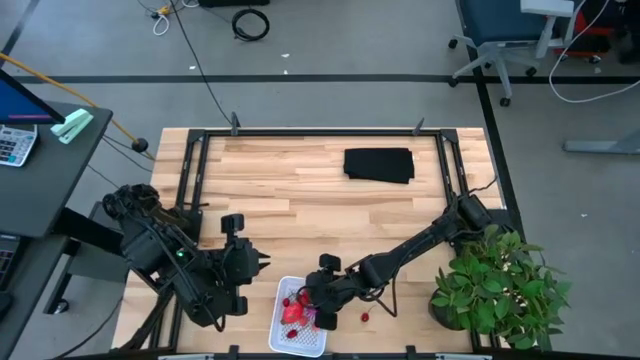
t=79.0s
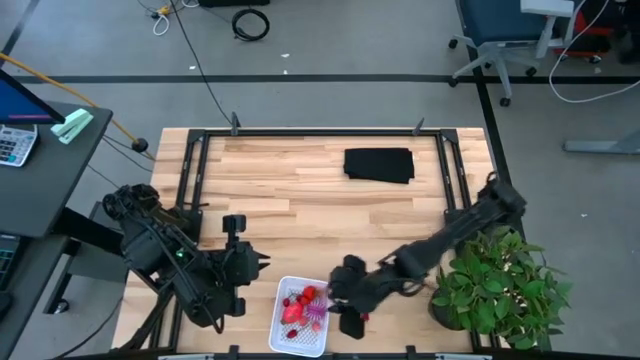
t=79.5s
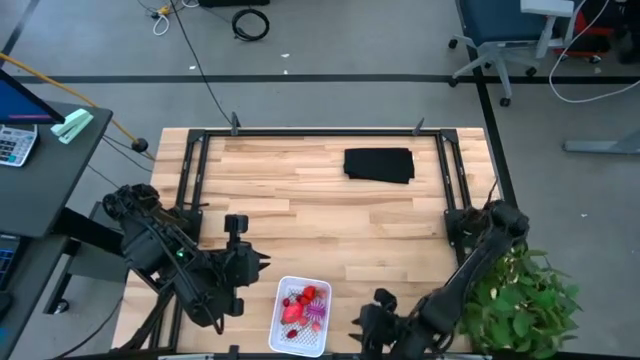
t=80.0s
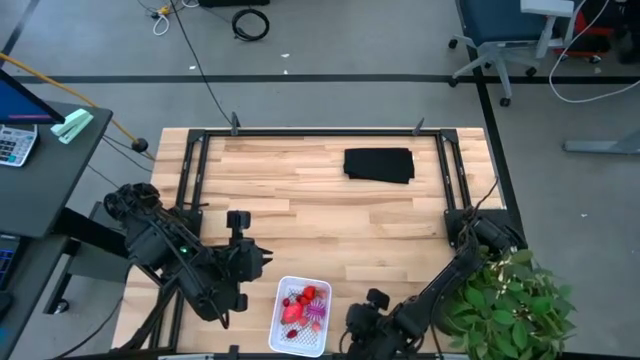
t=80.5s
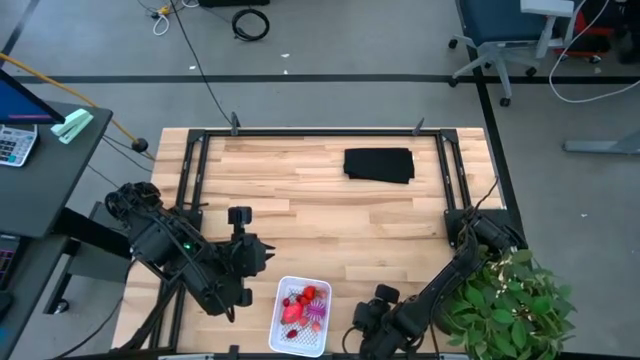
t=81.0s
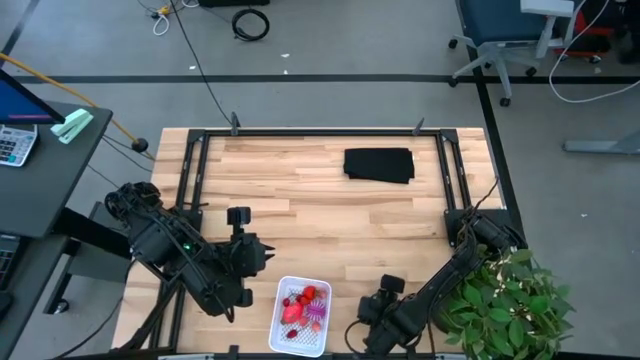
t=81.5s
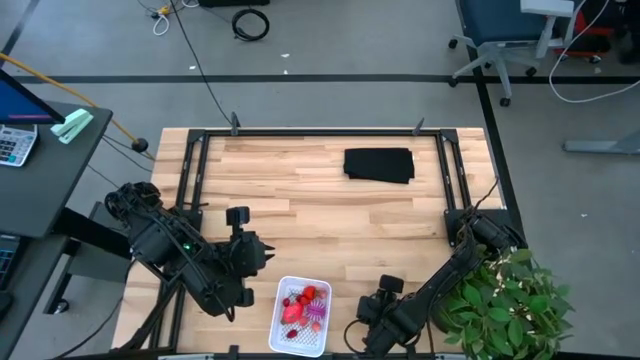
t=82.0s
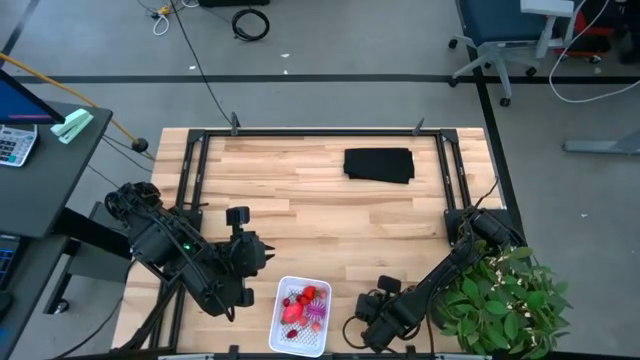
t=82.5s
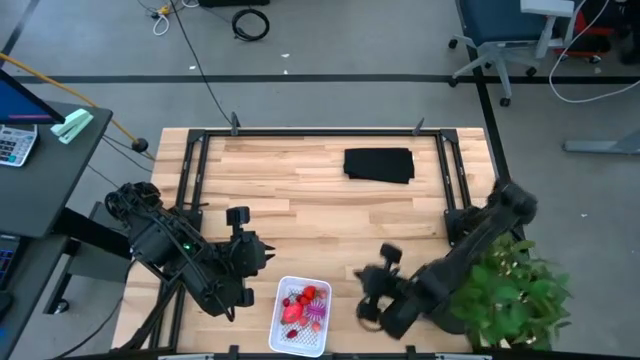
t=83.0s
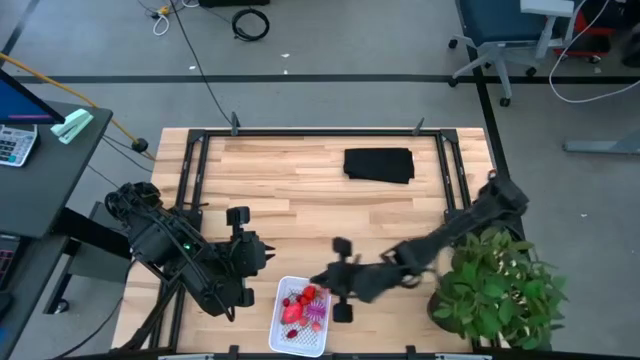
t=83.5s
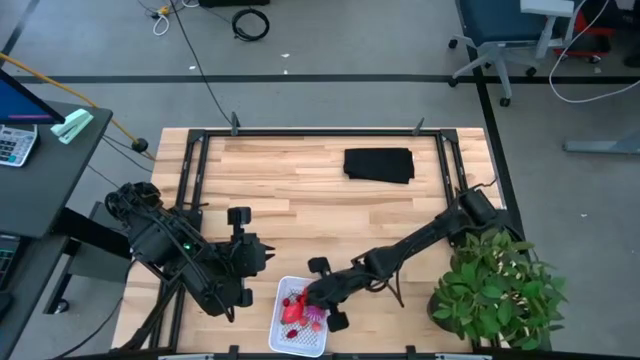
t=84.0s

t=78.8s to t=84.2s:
Task: Pick and placing Produce into tupperware
Put the cherry into the white basket

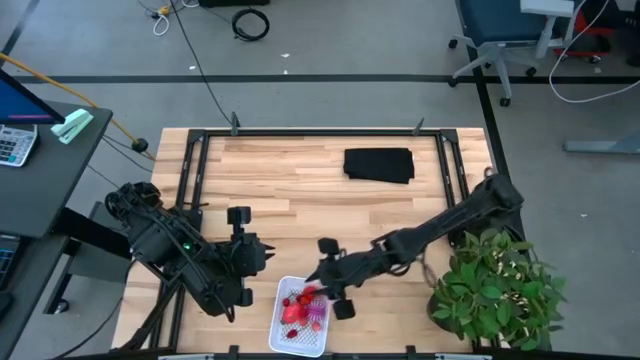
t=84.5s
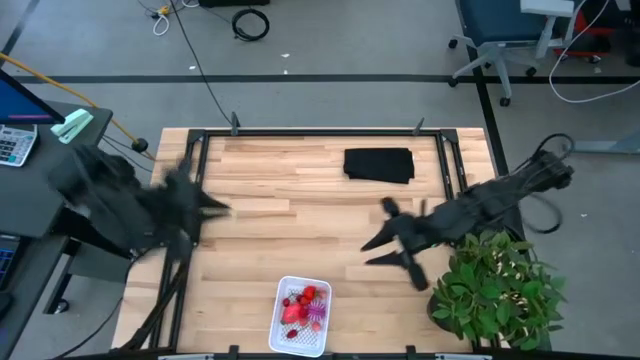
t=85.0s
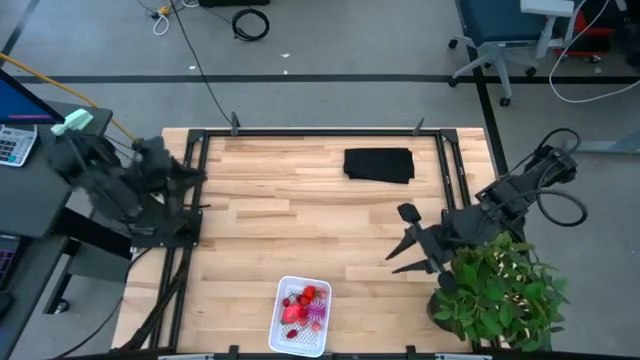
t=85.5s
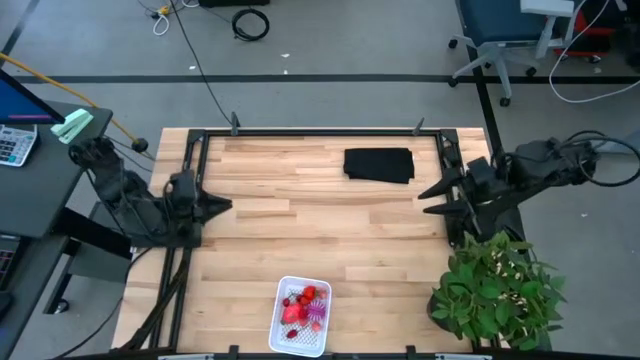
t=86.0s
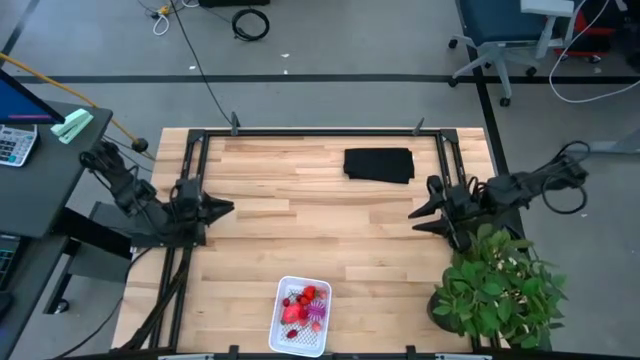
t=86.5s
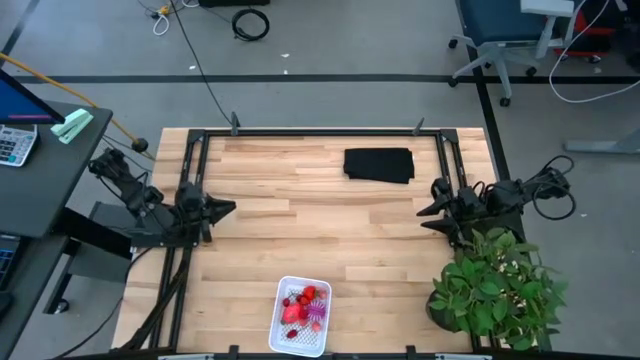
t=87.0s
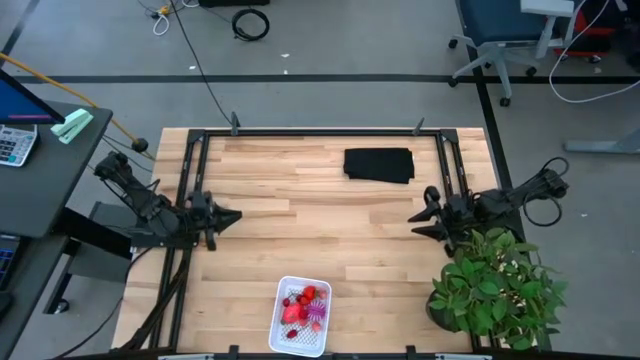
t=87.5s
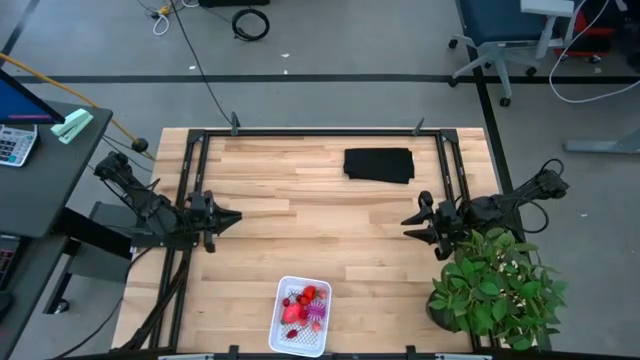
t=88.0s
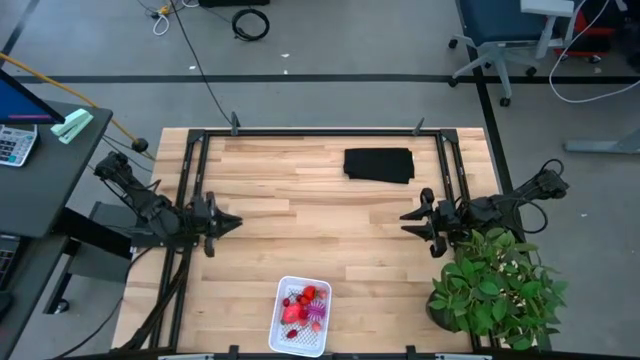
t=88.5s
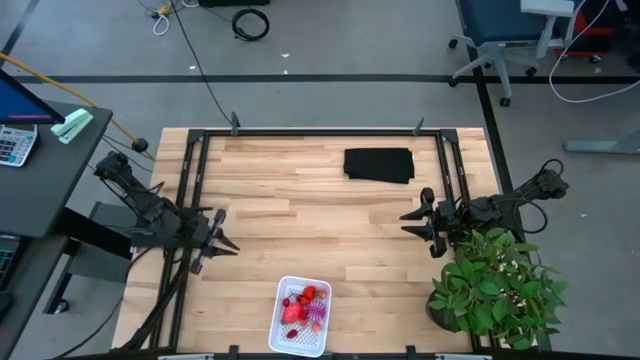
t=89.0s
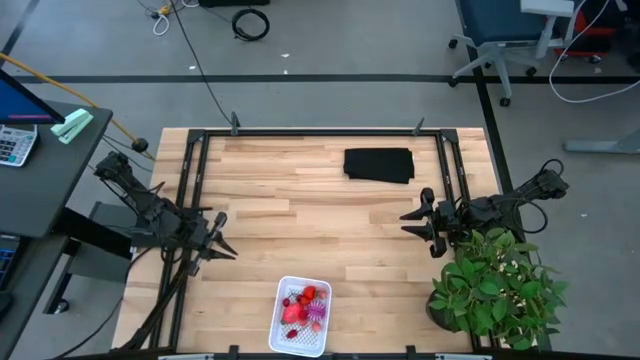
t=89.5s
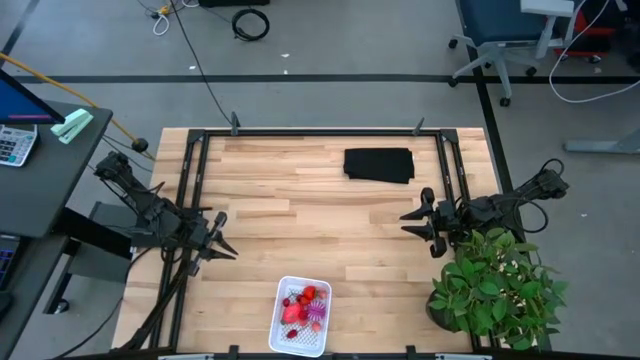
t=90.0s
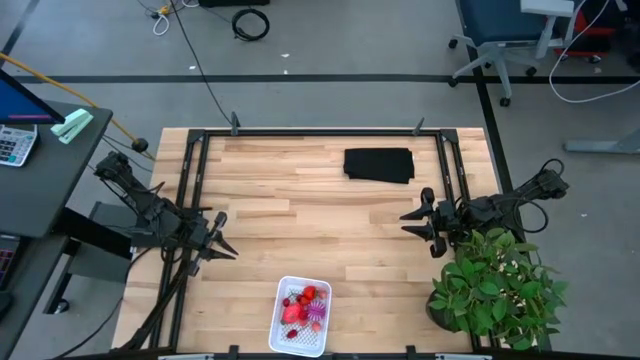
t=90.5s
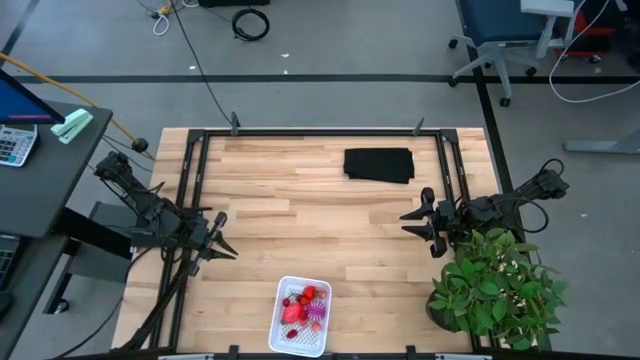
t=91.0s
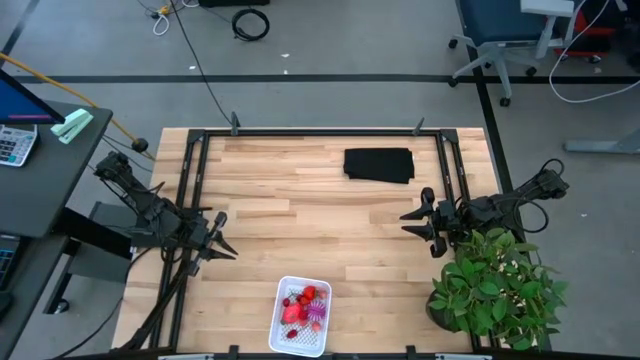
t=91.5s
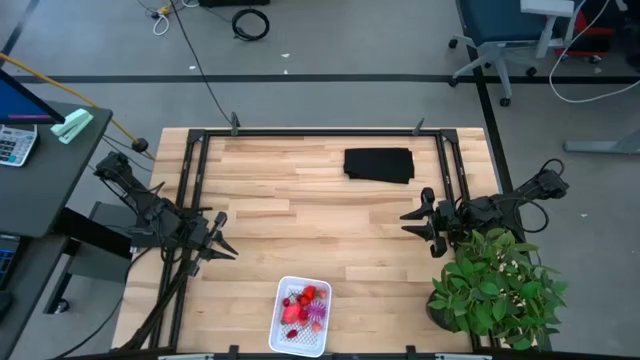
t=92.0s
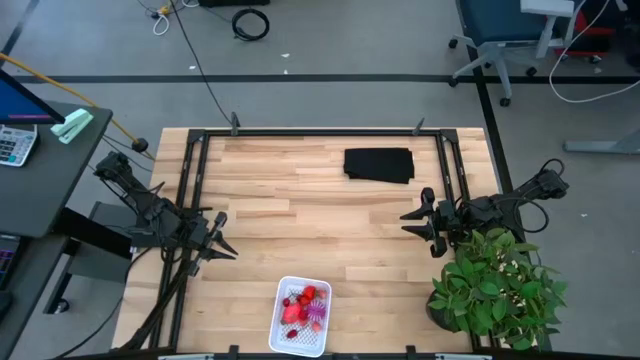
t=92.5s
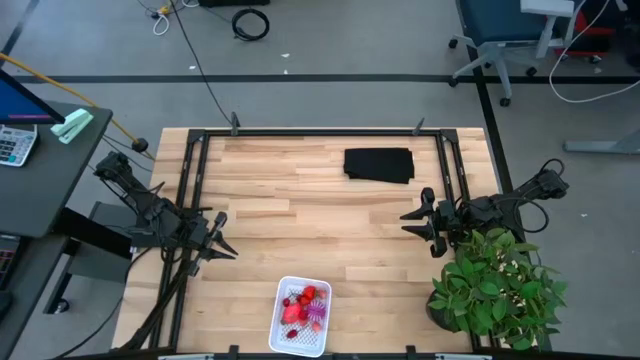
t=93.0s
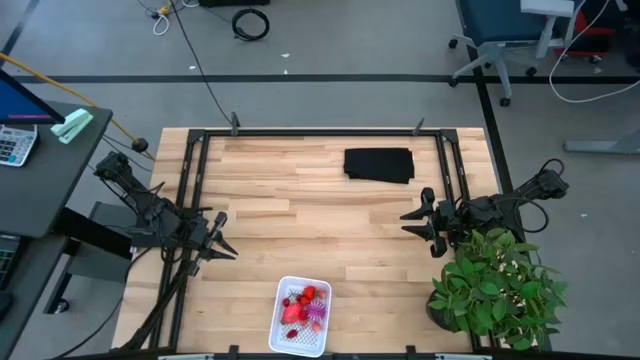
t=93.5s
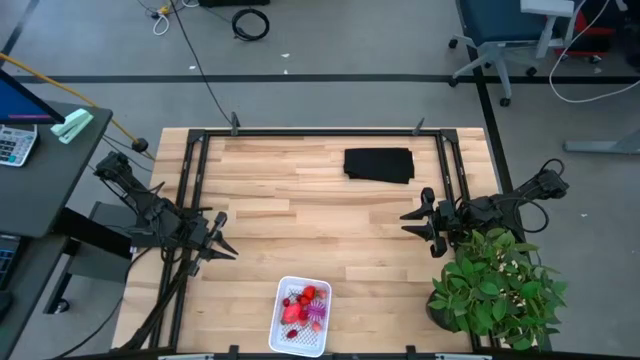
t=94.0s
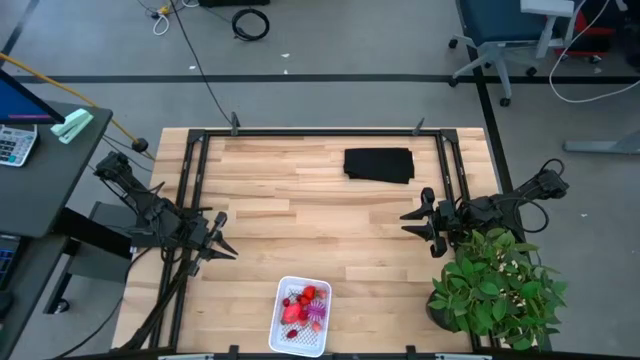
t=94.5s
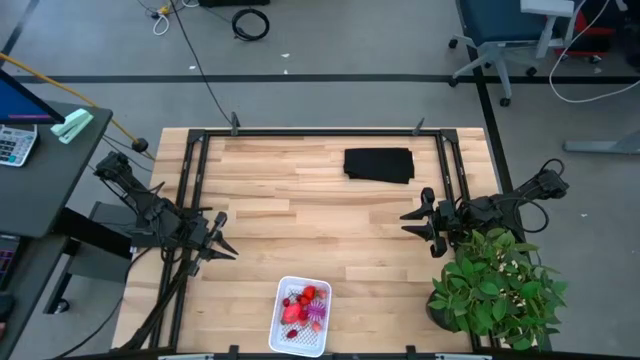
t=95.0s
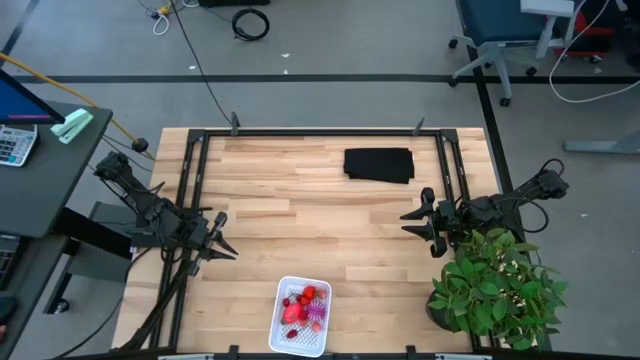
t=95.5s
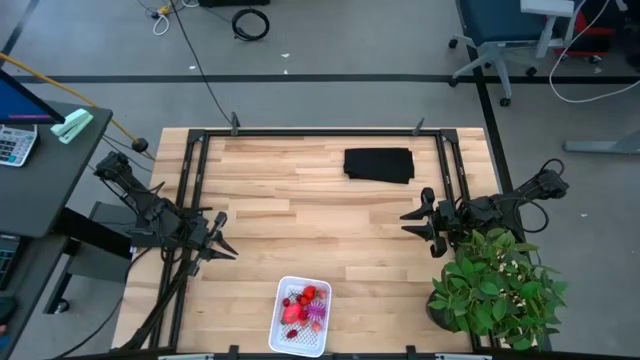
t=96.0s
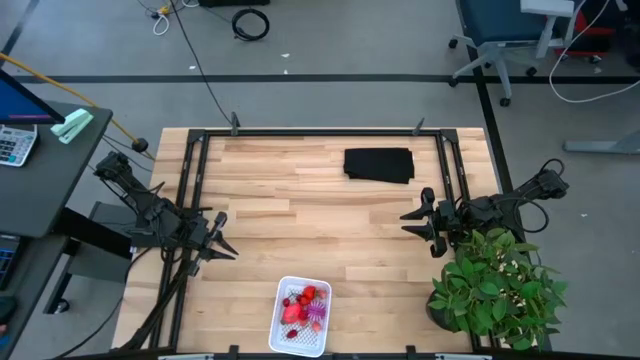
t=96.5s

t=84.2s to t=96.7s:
Return to Home Position

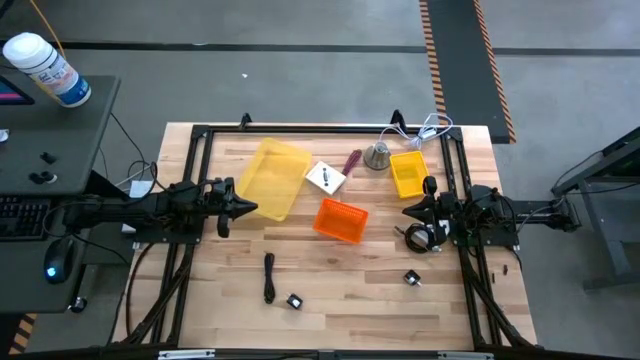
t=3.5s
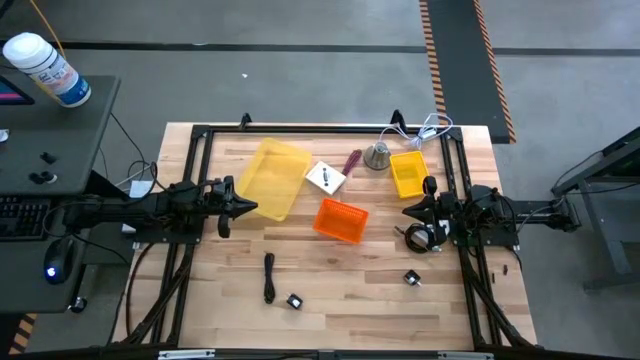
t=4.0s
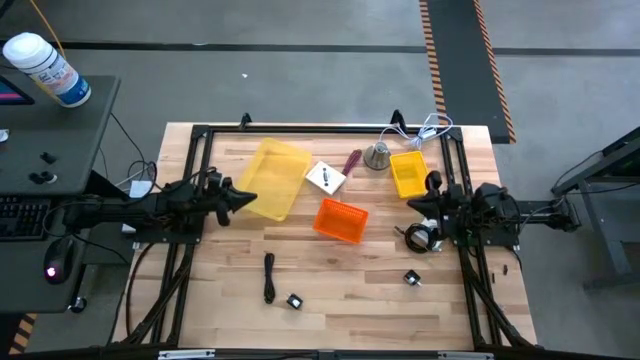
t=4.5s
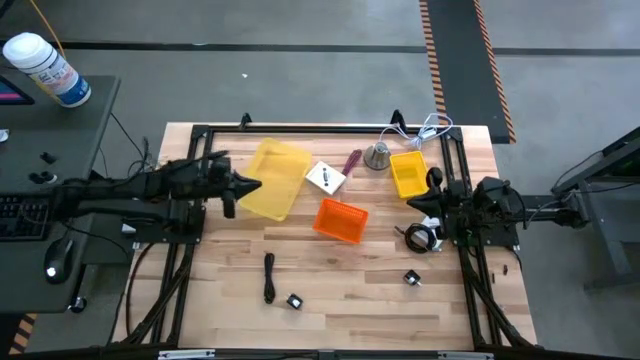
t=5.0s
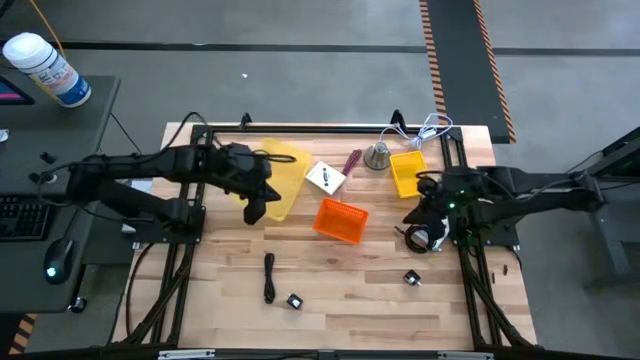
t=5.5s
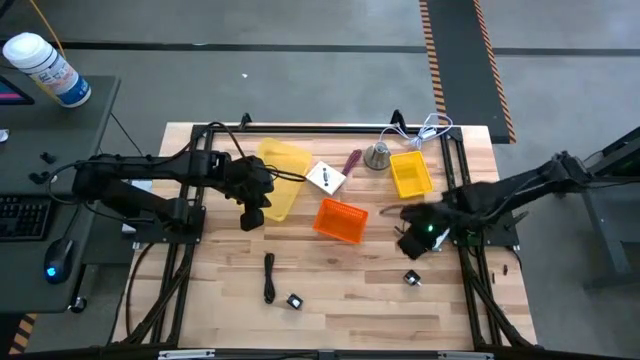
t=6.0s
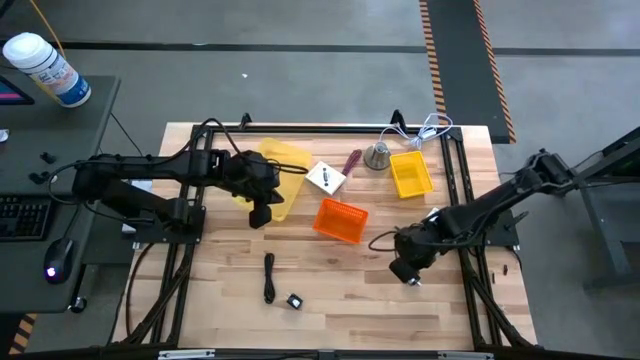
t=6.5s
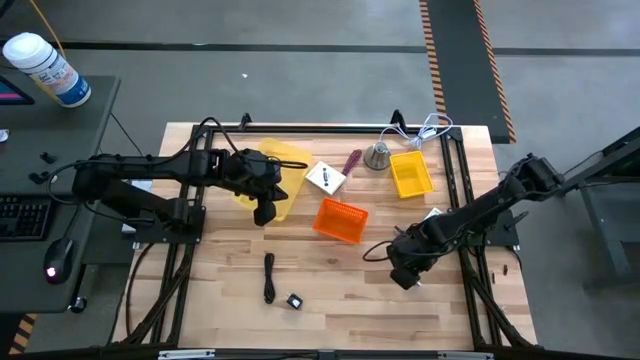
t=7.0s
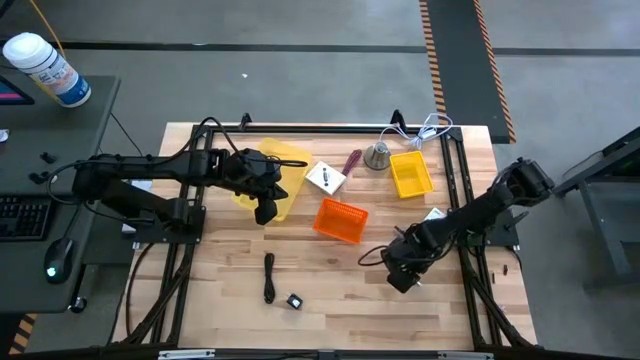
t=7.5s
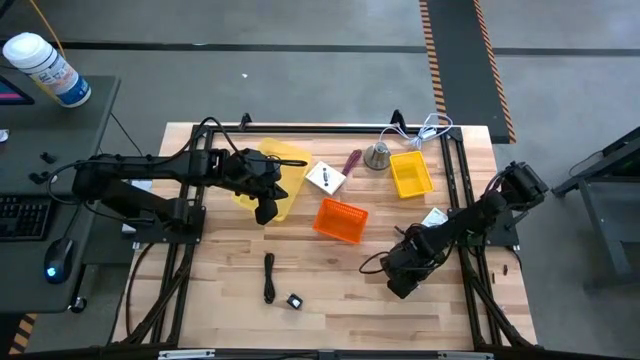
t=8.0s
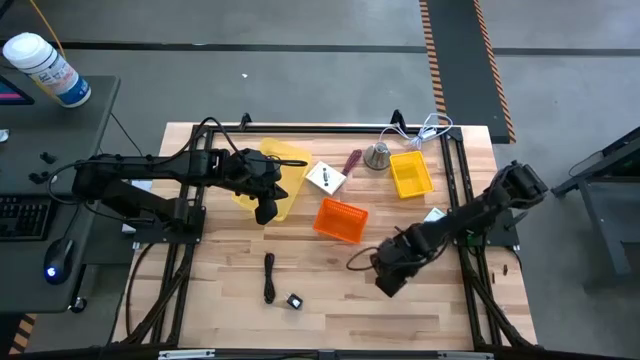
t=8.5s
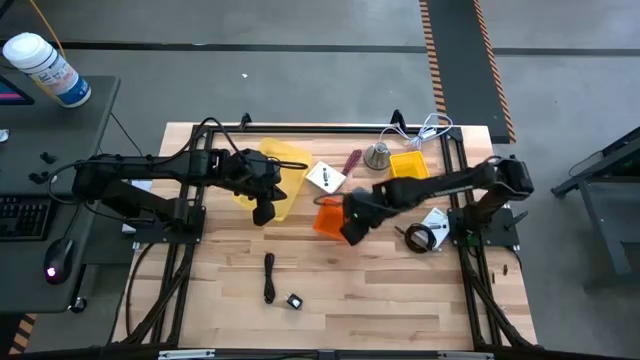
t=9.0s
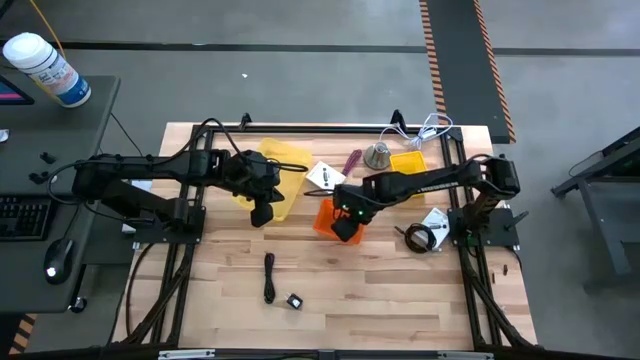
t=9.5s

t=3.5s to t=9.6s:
Task: Pick and place items into bin
Put the top black charger adapter into the orange bin
